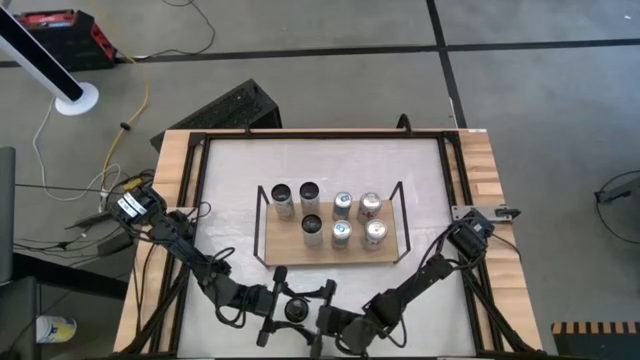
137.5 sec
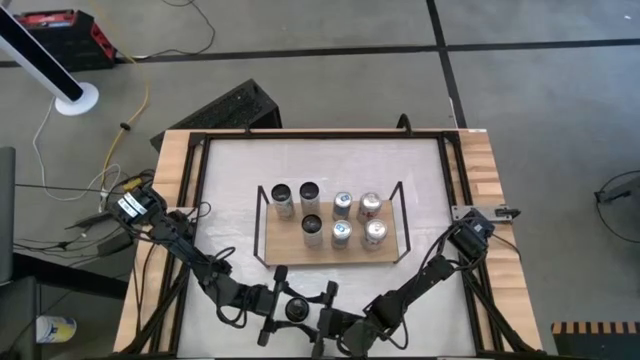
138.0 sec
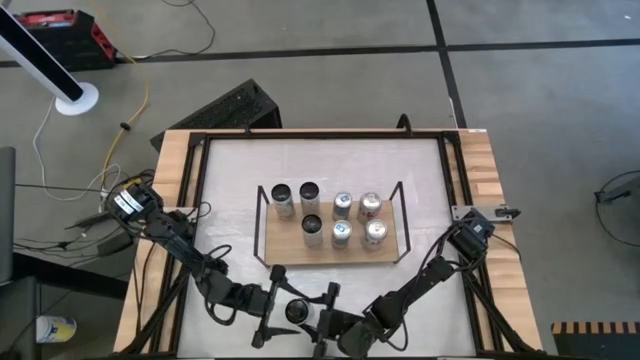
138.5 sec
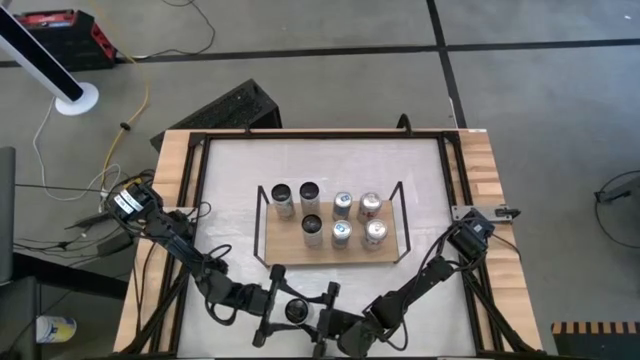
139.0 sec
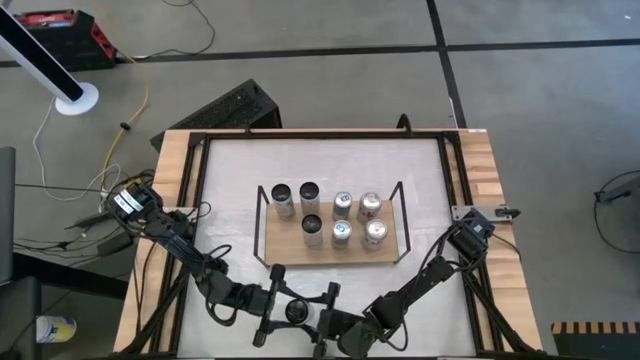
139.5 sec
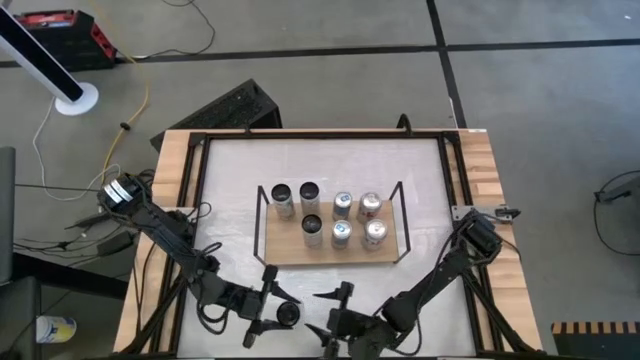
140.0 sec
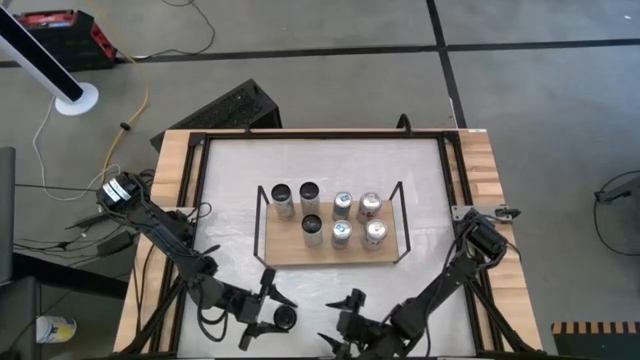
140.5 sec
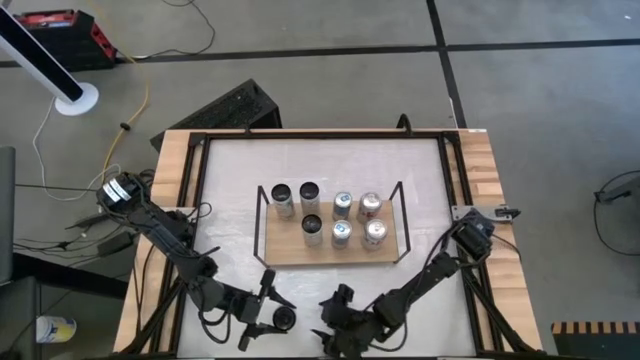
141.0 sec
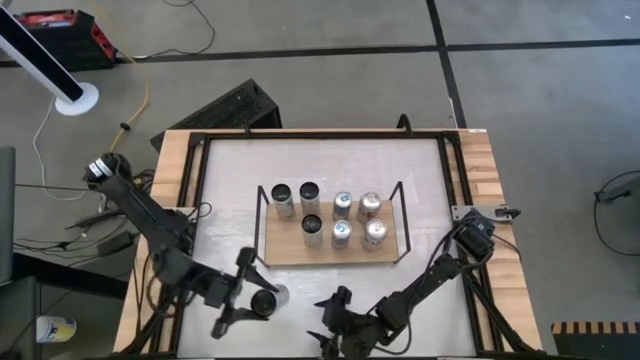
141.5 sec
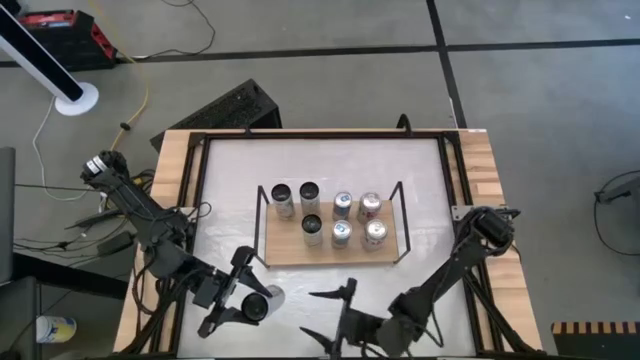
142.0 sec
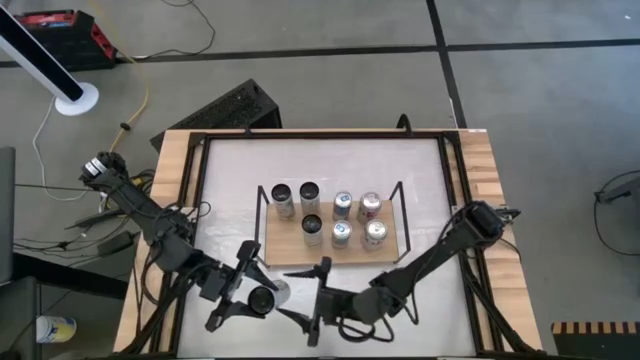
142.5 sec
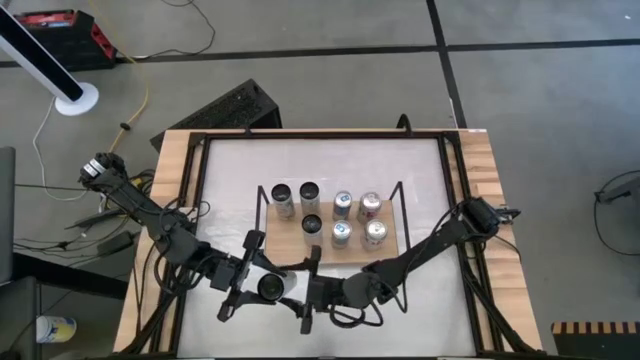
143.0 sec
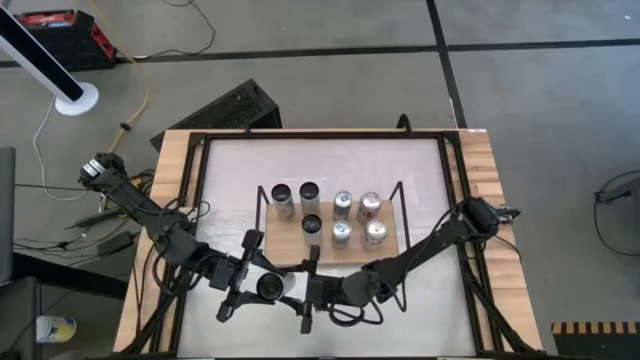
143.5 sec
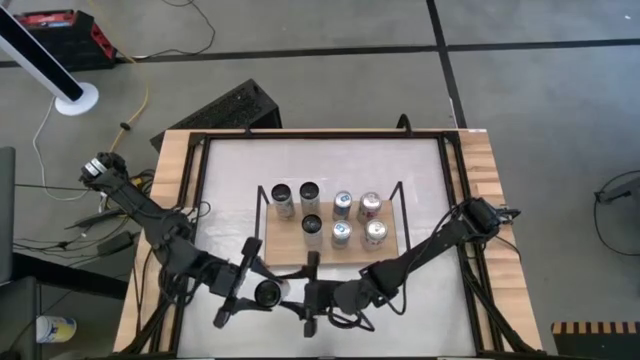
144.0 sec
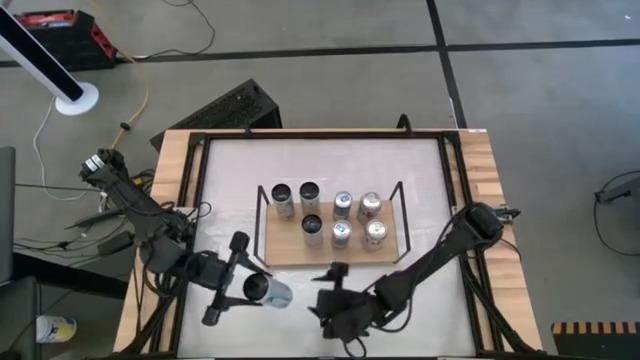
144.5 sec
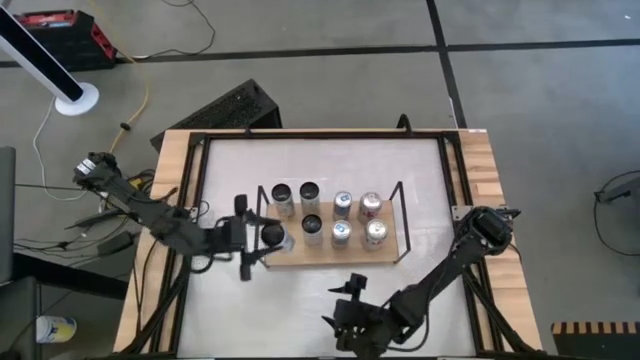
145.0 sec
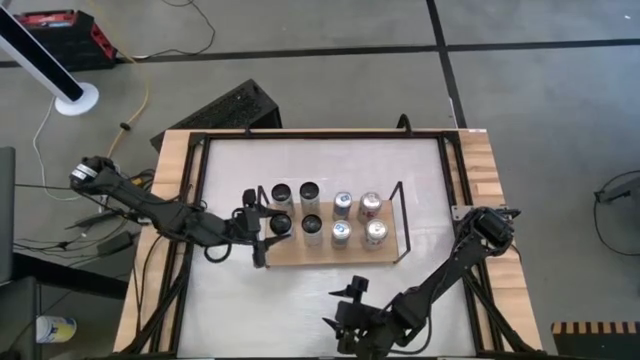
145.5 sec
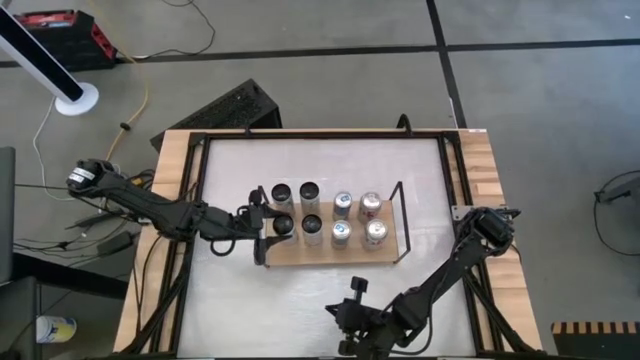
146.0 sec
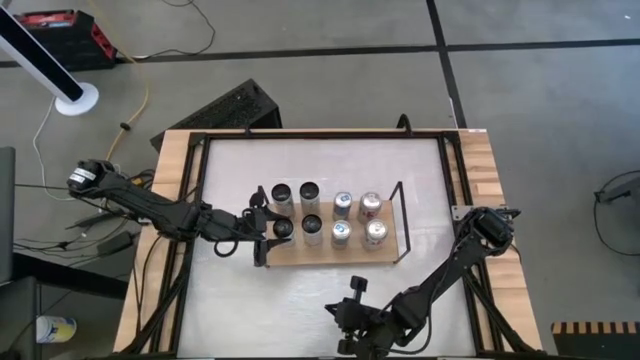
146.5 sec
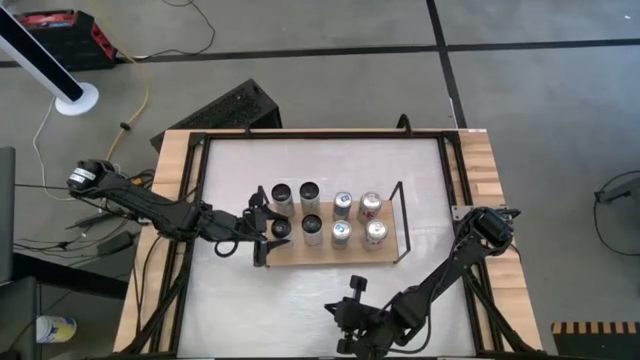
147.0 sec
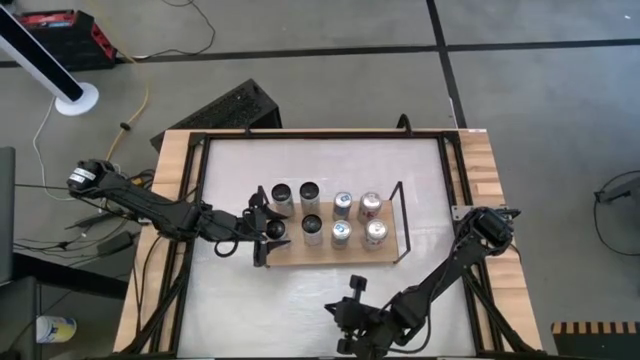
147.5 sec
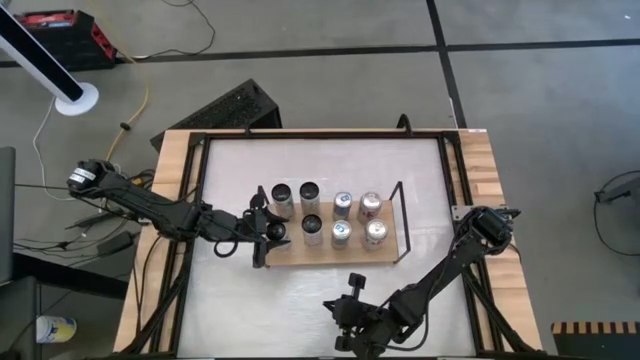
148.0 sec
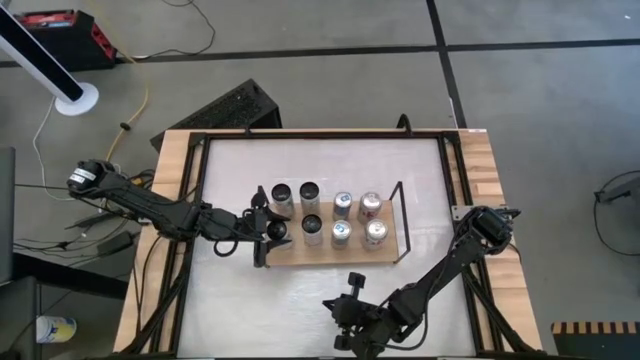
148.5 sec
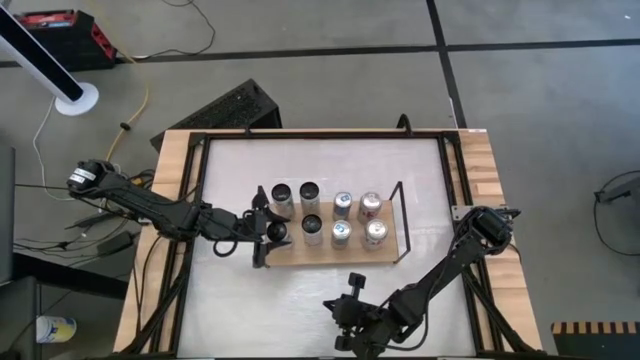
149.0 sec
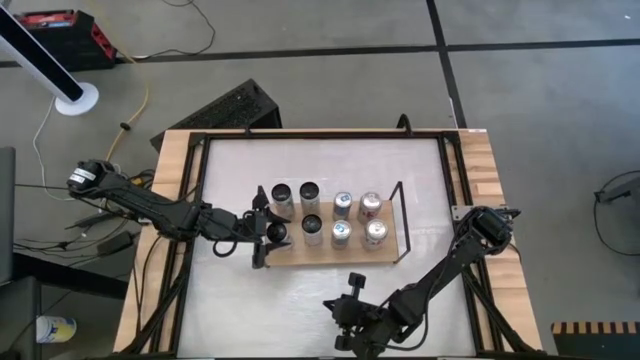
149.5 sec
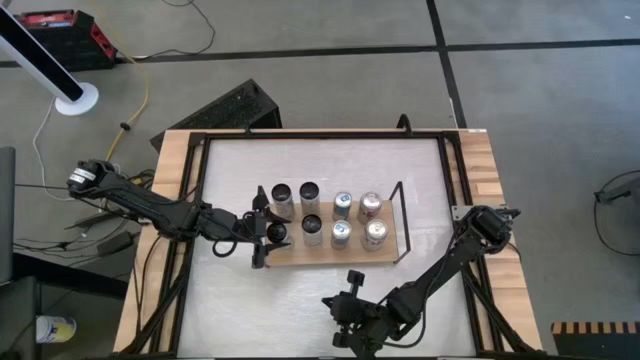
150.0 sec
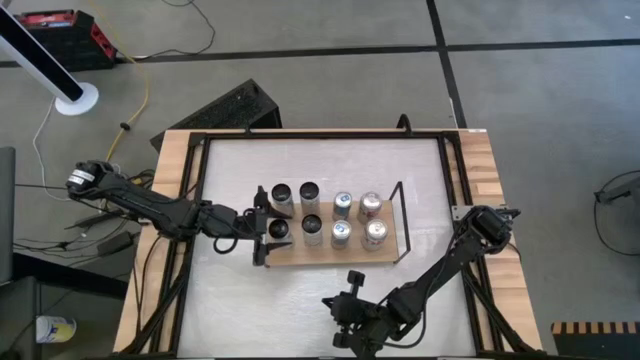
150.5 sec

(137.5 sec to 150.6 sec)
Task: Place canned beverage on shelf
Put the white pink soda can on the shelf aligned with the other white pink soda can

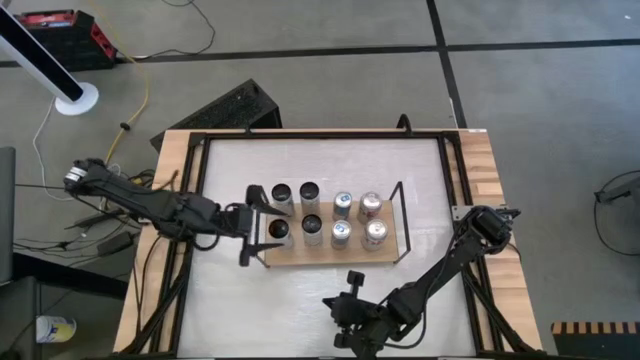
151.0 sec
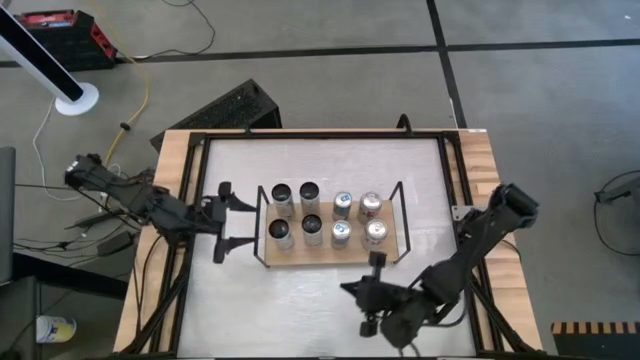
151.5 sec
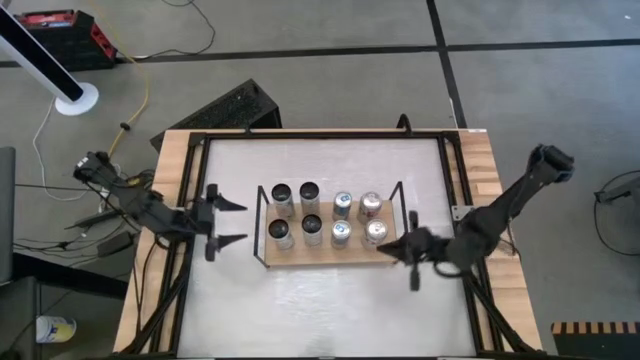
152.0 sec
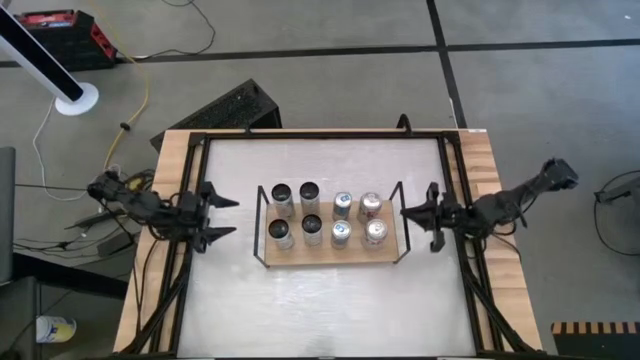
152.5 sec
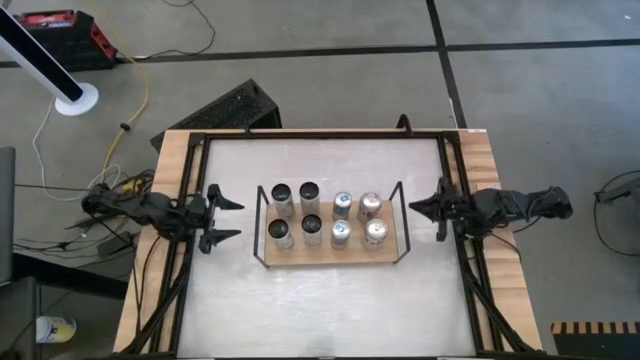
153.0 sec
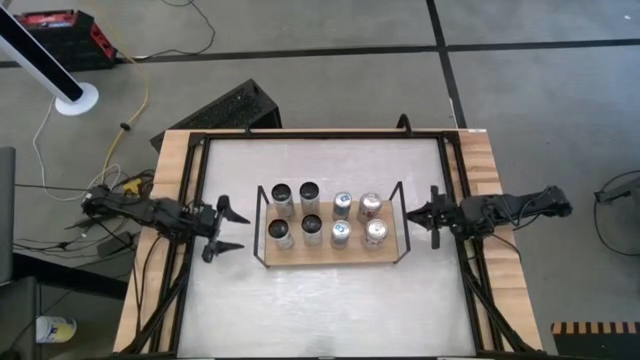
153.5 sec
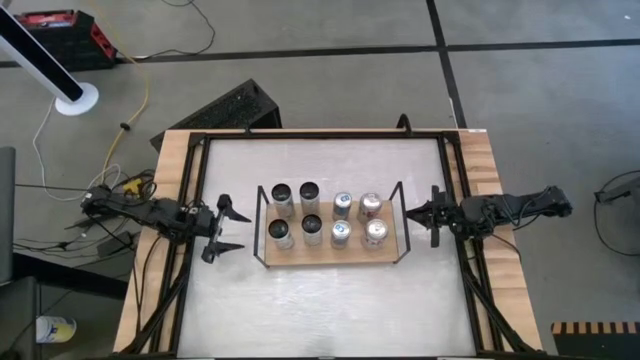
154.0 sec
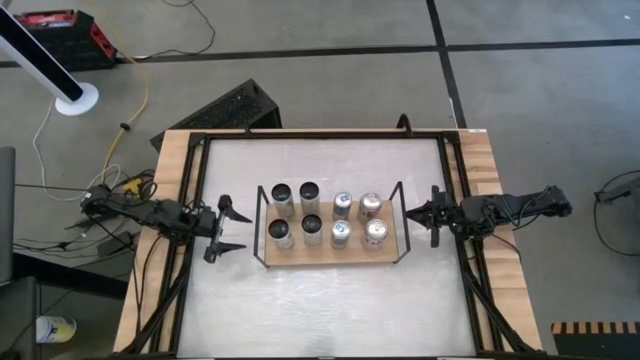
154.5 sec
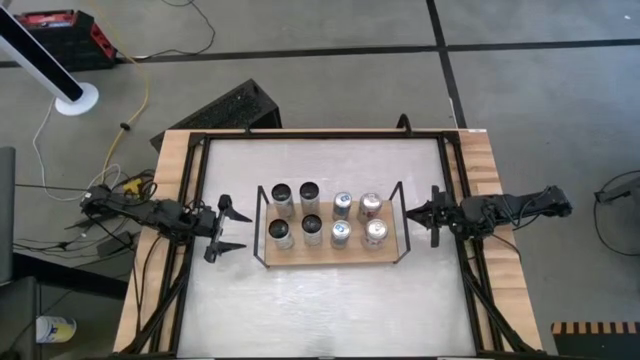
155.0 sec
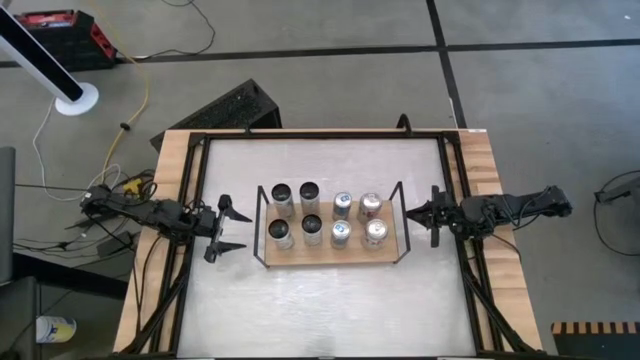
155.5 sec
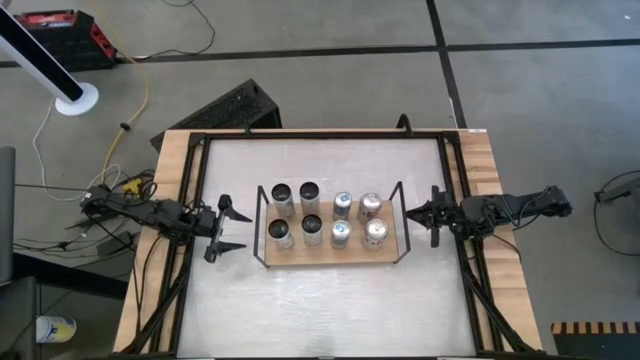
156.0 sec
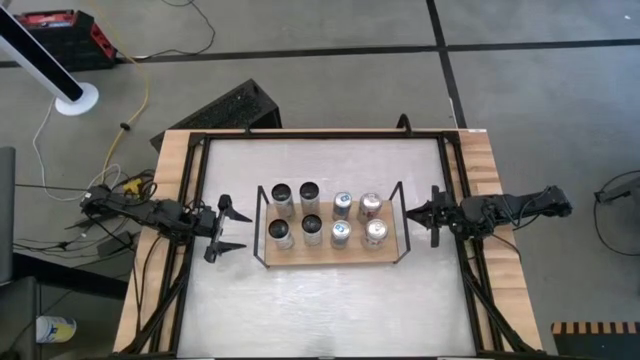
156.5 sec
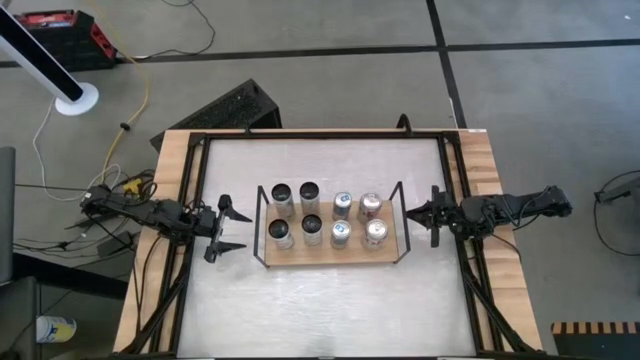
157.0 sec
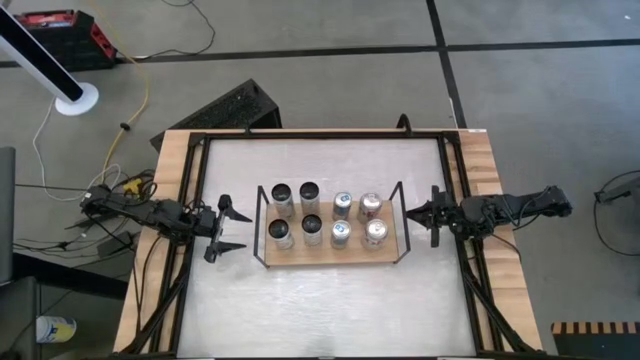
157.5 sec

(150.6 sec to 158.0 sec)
Return to Home Position

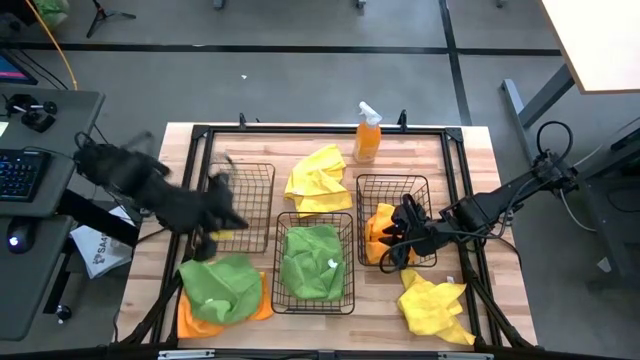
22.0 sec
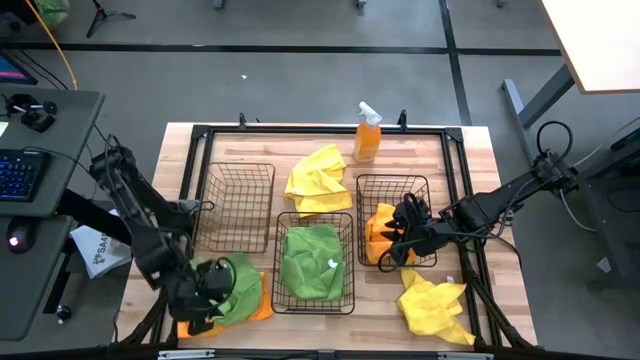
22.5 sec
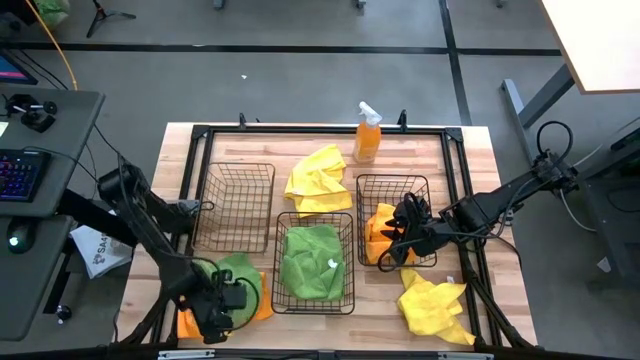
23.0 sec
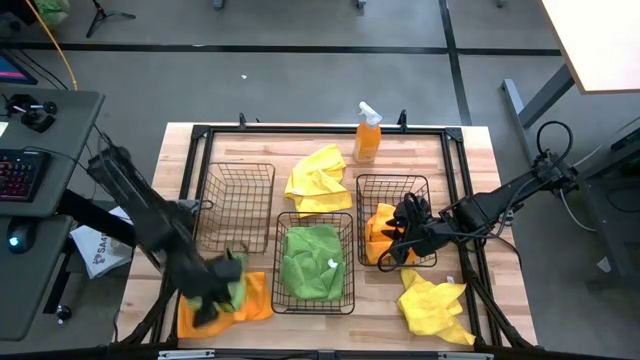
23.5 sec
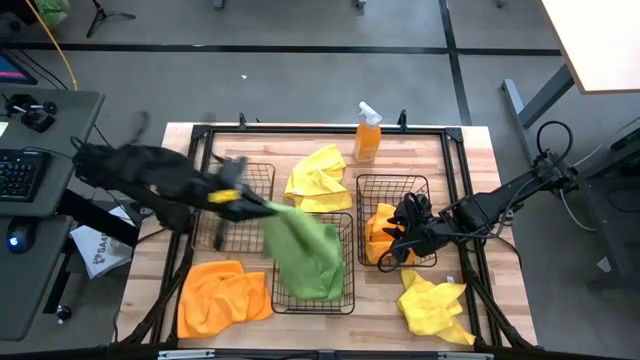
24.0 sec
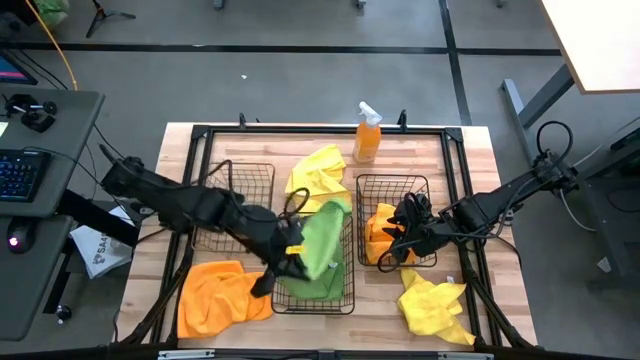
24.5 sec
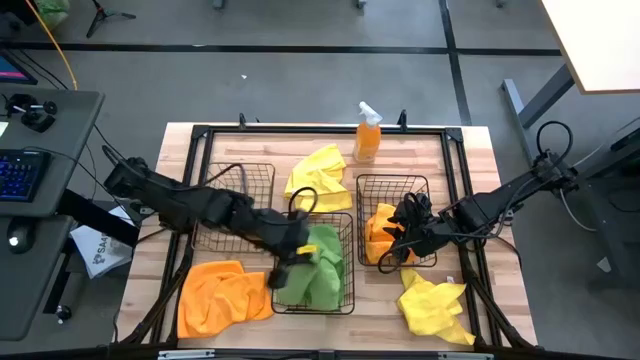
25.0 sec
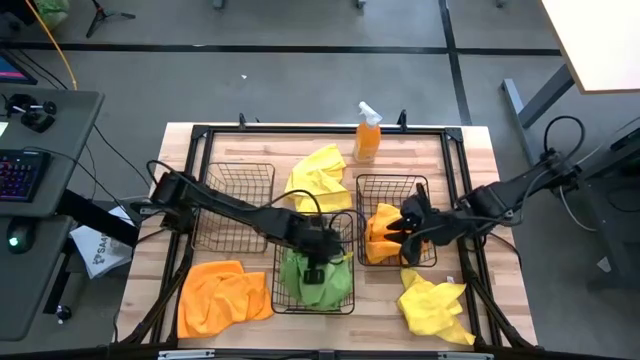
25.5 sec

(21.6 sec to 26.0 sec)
Task: Sort microfiber towel by color & place in baskets
Put the green towel into the middle wire basket
